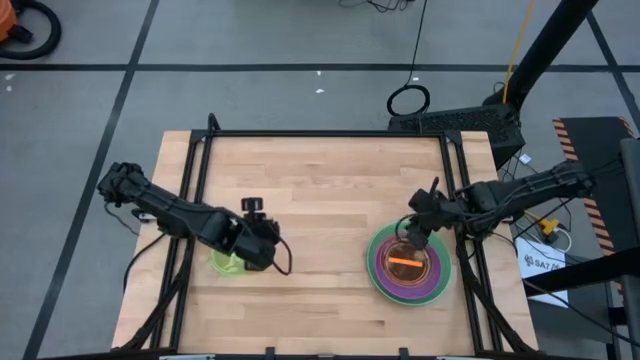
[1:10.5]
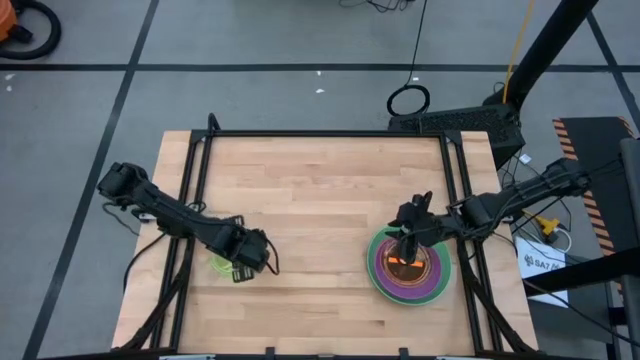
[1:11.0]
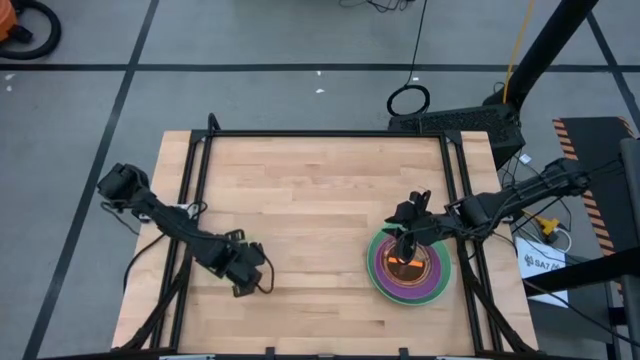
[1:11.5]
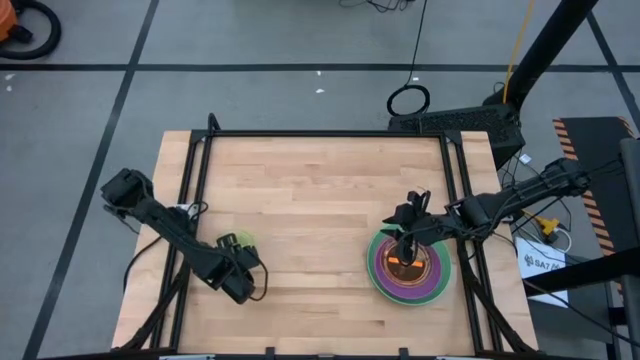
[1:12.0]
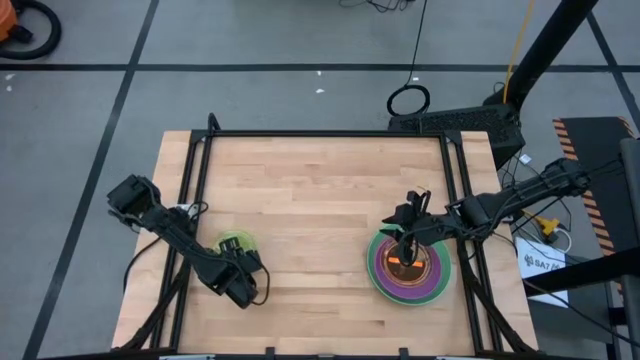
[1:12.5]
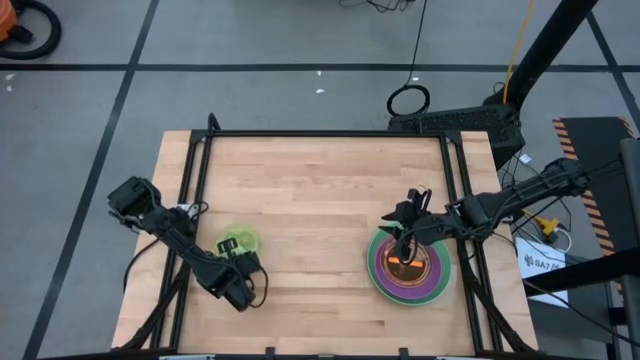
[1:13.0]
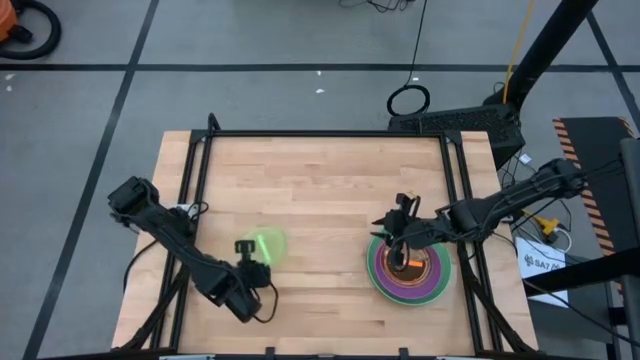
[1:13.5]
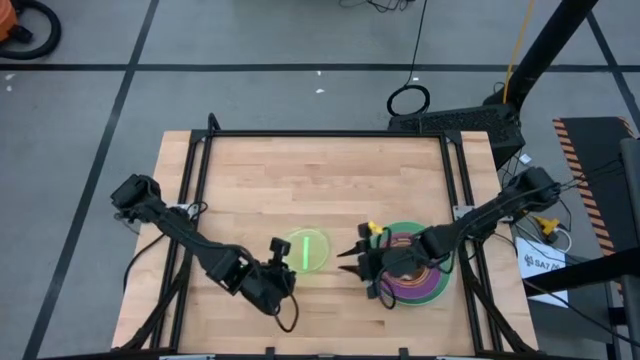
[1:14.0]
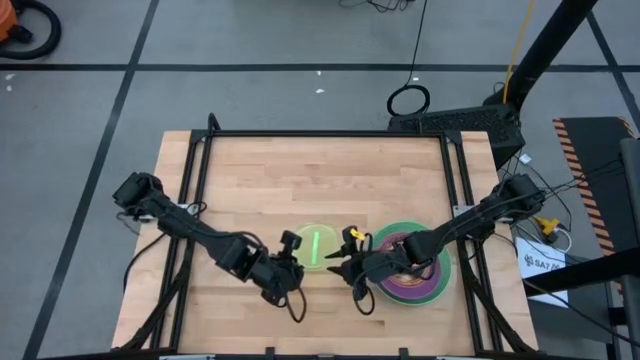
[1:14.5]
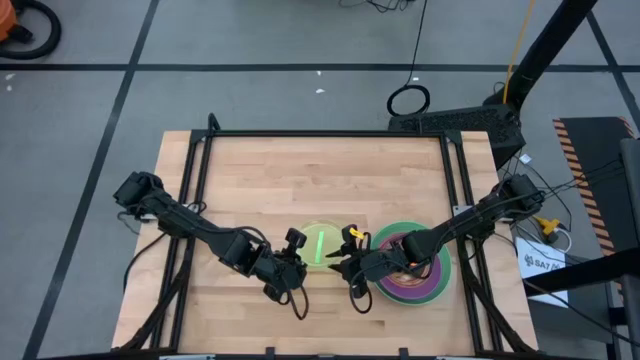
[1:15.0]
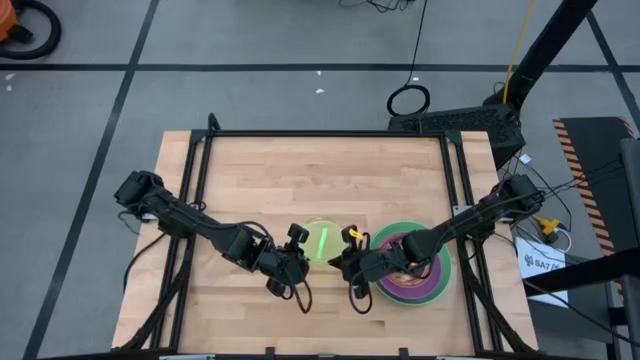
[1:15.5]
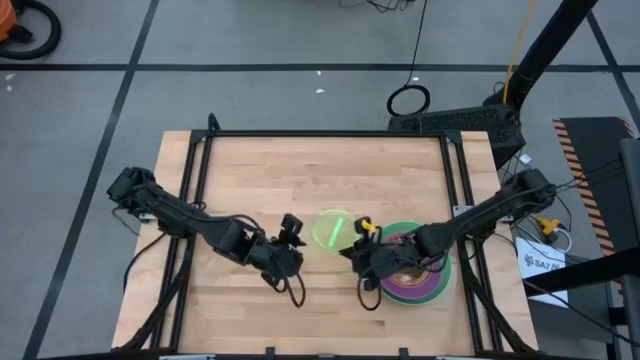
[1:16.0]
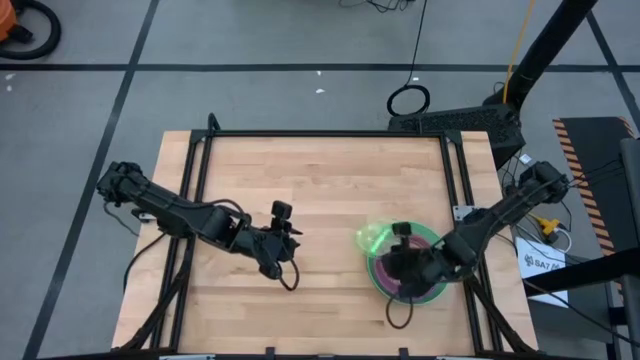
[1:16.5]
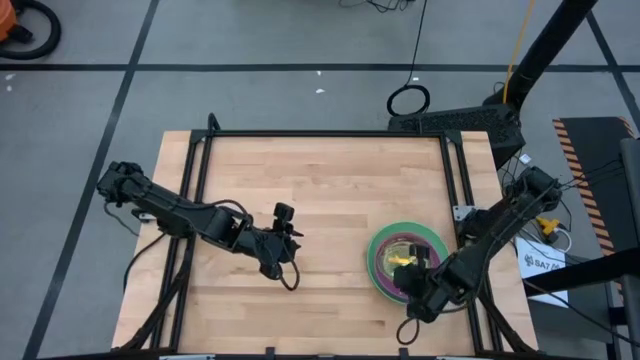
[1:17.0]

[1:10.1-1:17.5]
Task: Stack plastic plates
Stack the small green plate on top of the small orange plate

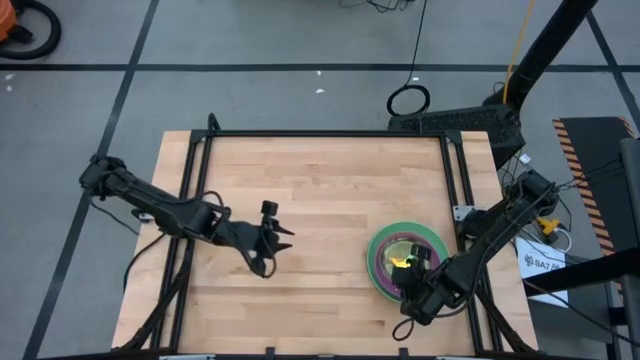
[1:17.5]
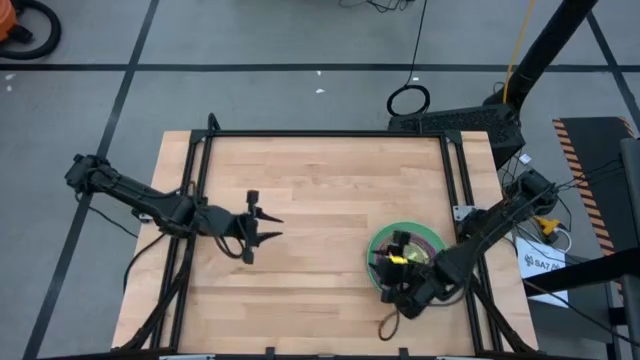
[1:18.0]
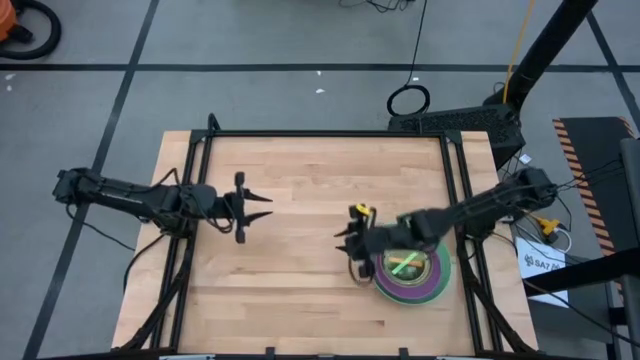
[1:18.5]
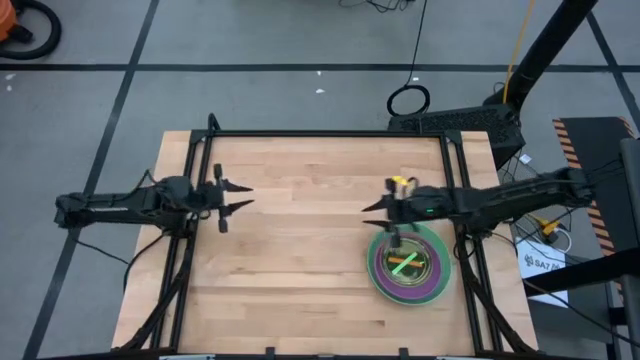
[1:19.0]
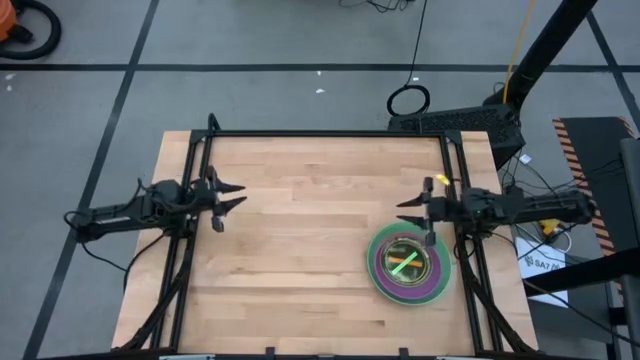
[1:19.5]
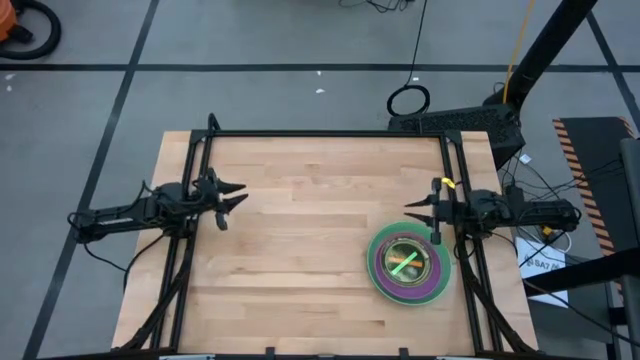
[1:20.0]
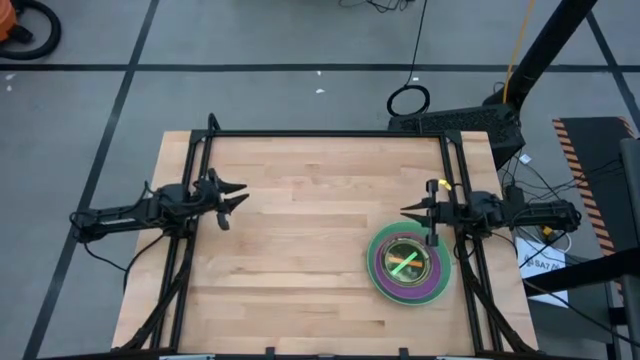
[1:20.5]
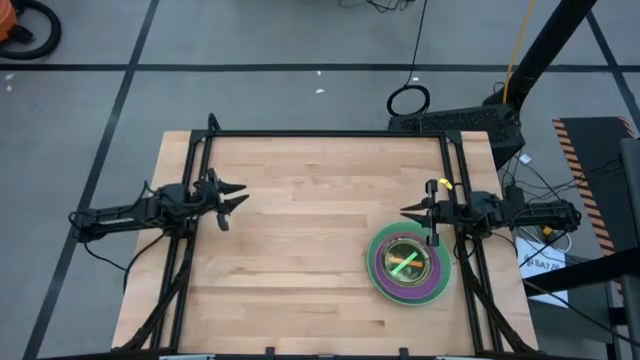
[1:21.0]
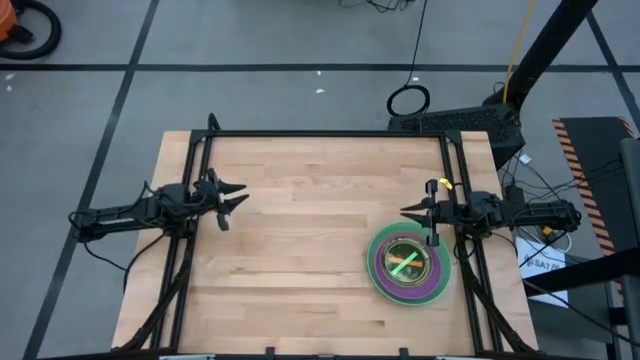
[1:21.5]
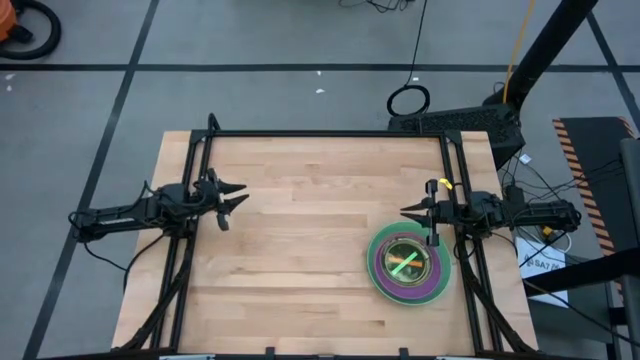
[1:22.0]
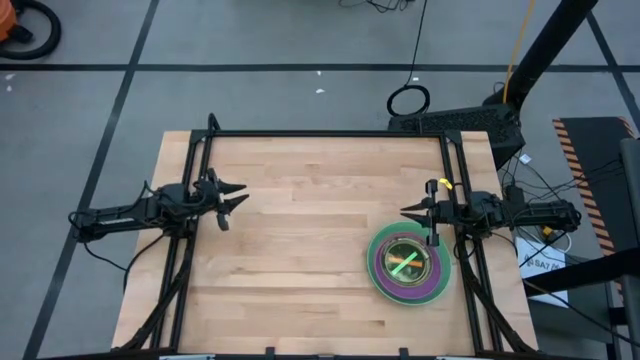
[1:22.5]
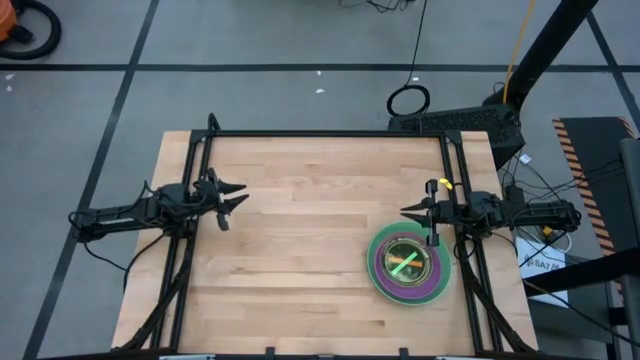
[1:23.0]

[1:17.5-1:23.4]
Return to Home Position

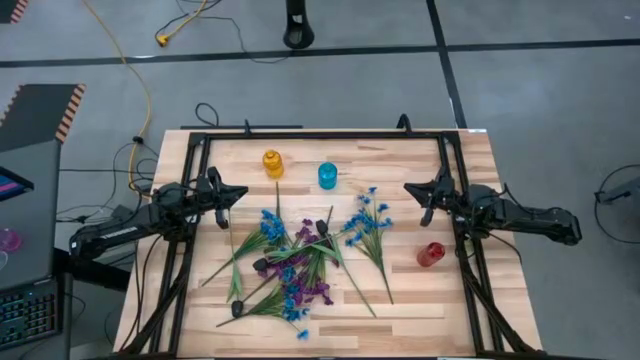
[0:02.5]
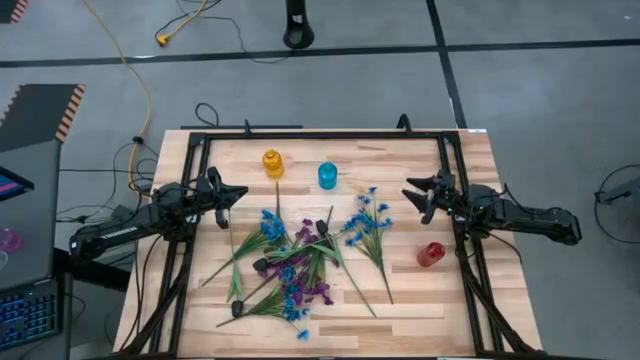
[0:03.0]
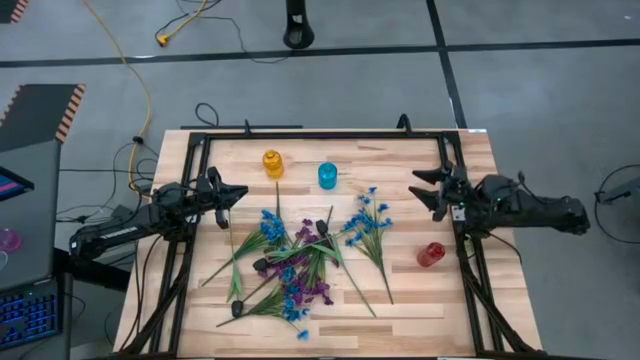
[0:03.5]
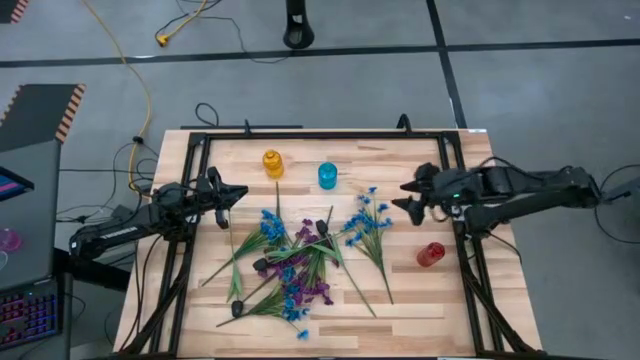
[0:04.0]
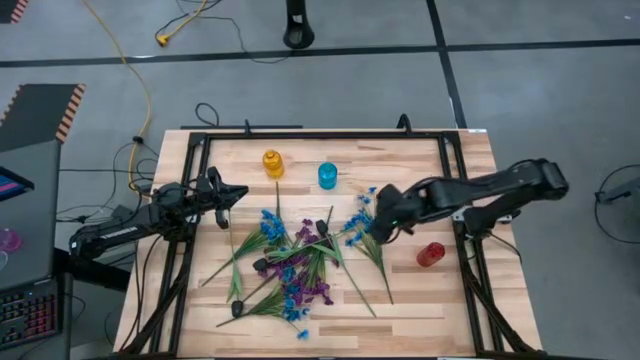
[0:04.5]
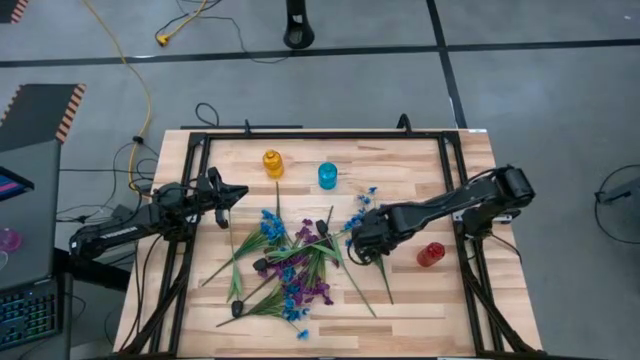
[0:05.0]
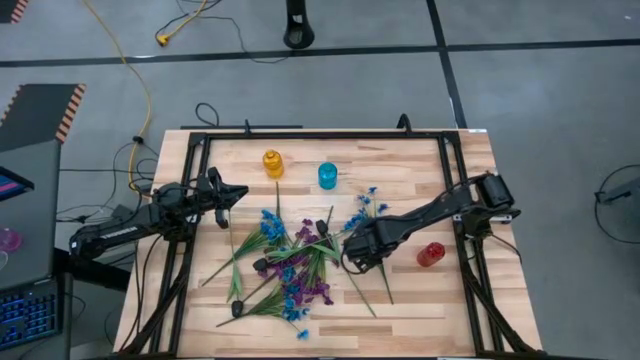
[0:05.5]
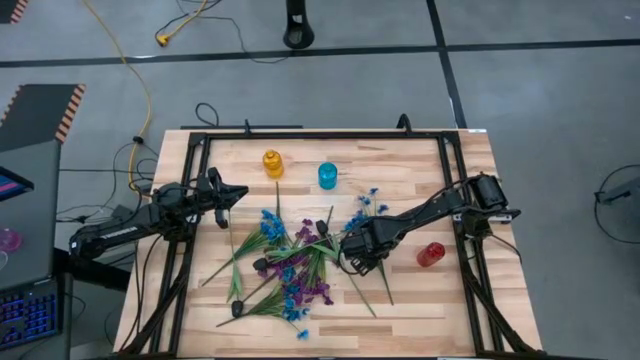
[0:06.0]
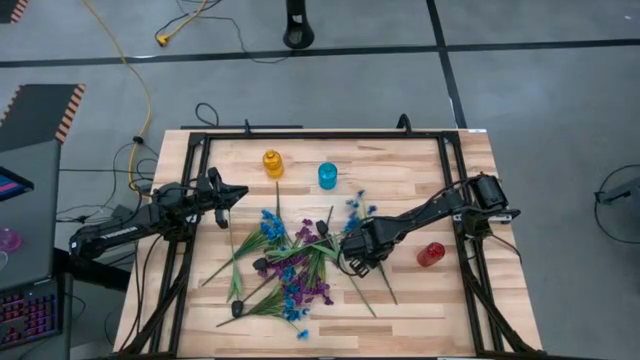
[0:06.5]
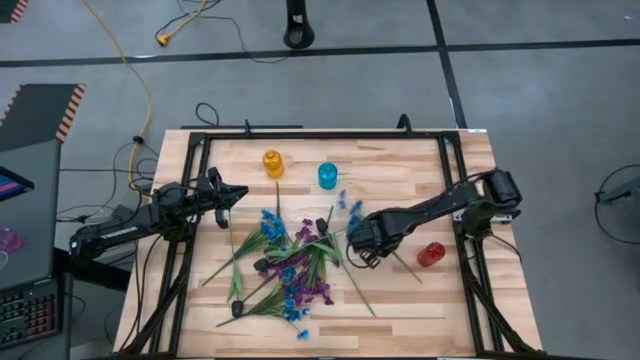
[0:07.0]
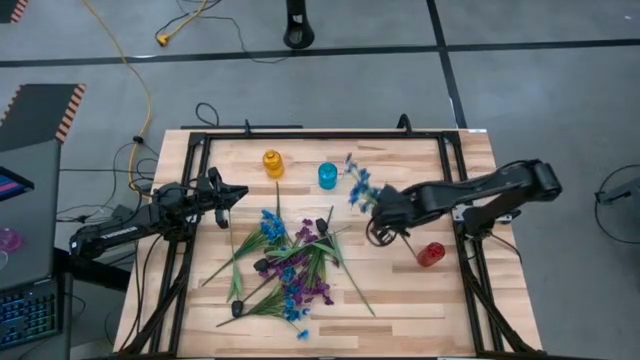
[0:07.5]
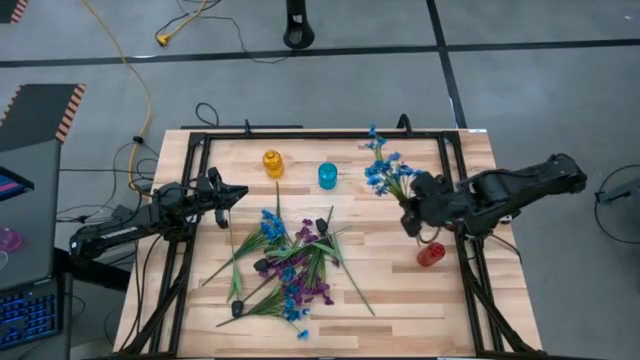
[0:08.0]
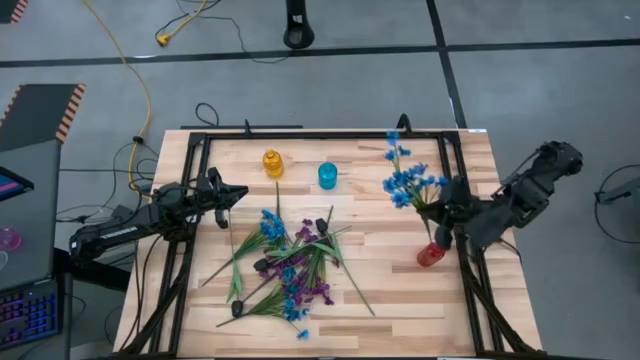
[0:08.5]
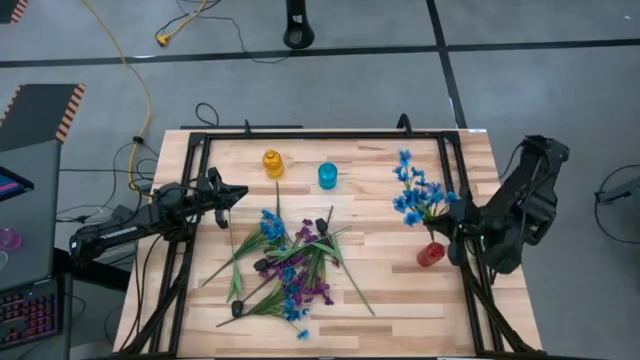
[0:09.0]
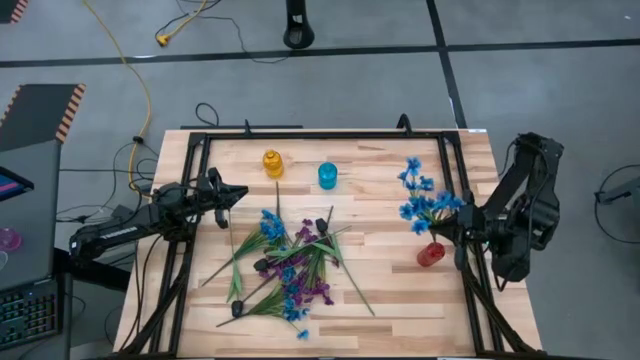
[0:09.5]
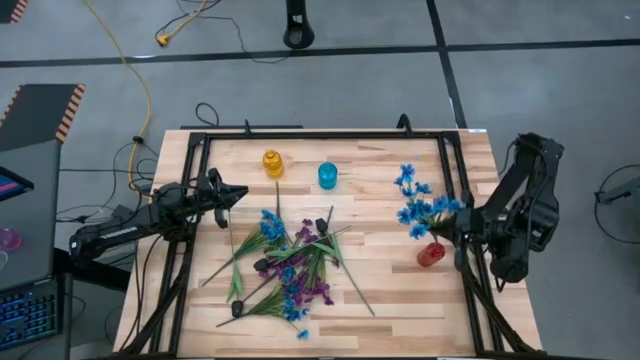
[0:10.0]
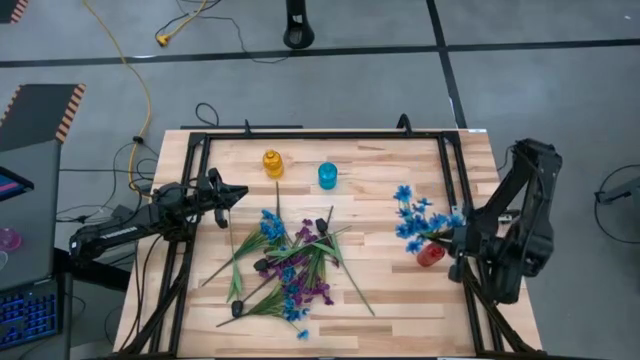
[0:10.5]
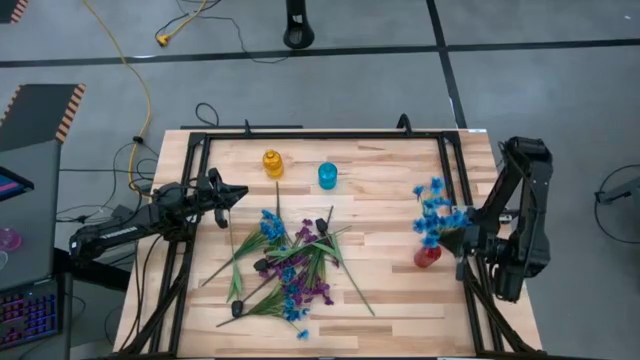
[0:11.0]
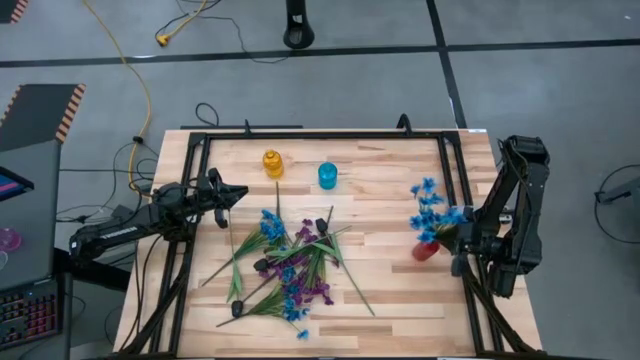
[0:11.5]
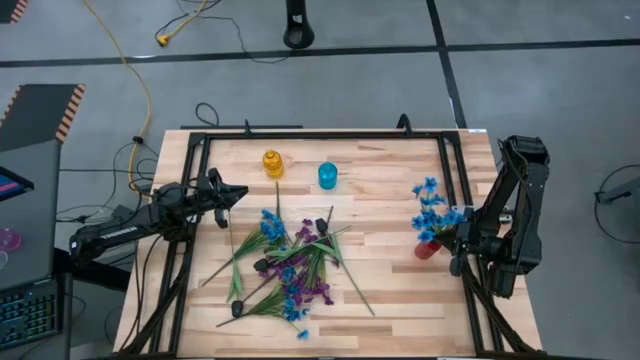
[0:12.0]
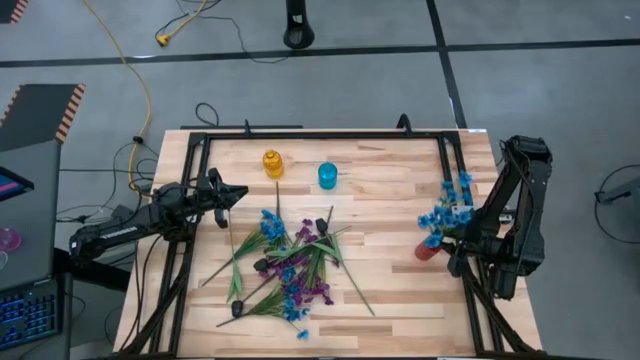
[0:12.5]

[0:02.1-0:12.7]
Task: Sort flowers into vase by color
Put the right blue flower into the red vase
